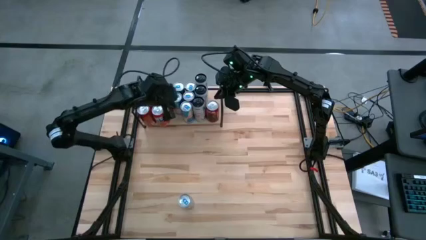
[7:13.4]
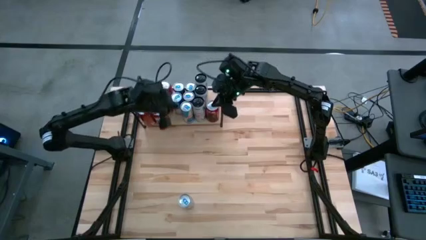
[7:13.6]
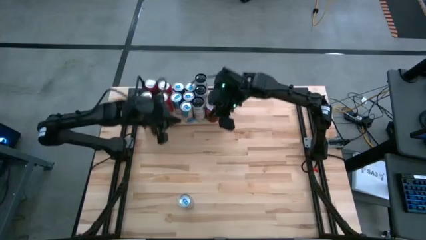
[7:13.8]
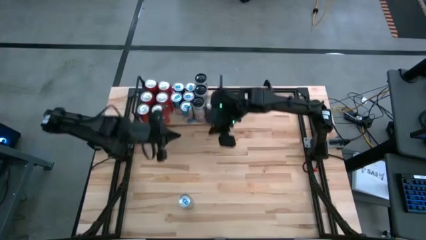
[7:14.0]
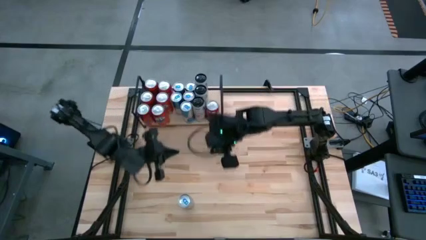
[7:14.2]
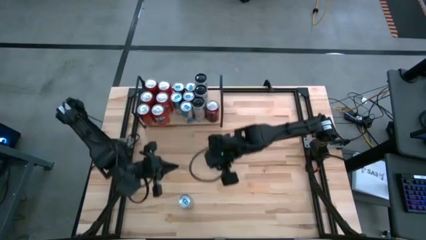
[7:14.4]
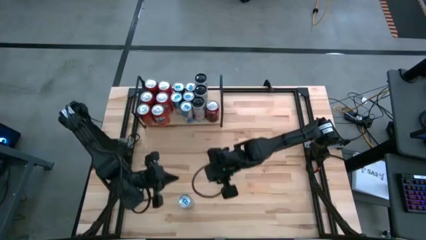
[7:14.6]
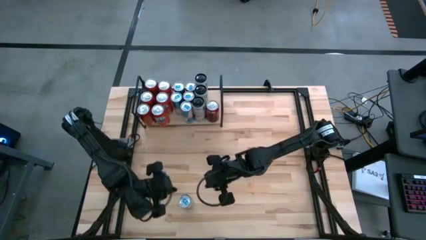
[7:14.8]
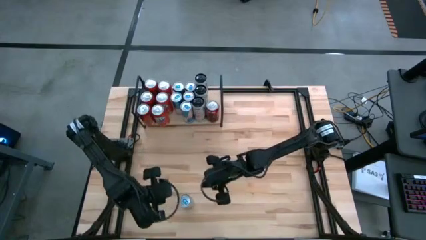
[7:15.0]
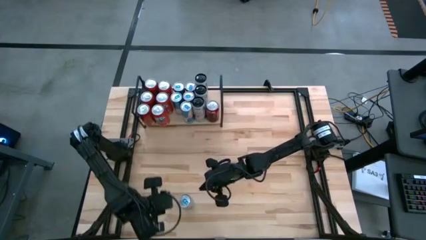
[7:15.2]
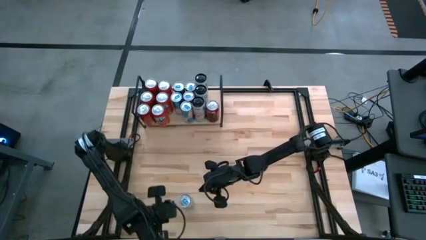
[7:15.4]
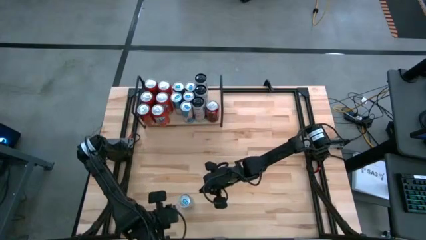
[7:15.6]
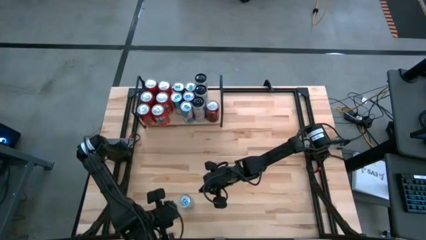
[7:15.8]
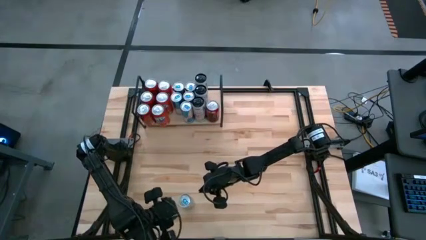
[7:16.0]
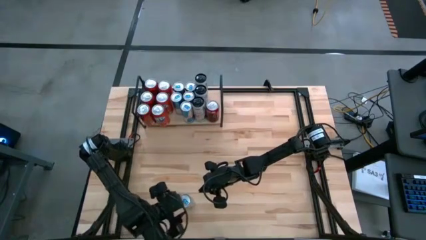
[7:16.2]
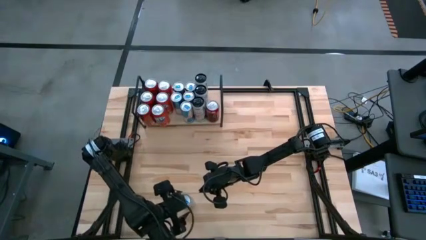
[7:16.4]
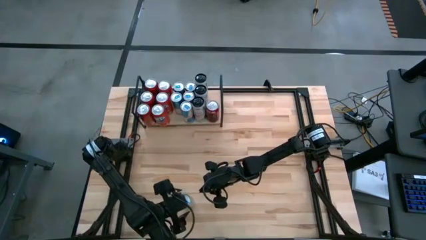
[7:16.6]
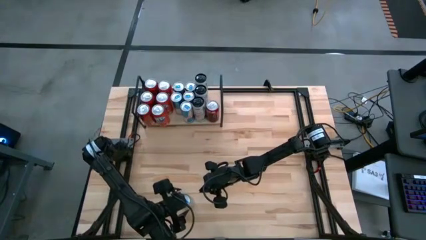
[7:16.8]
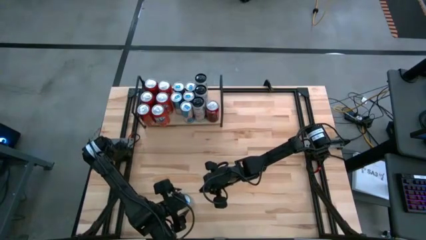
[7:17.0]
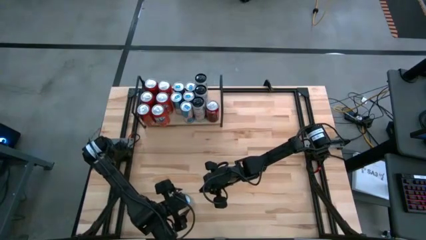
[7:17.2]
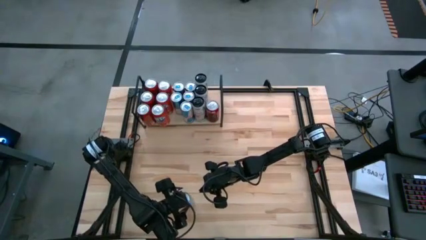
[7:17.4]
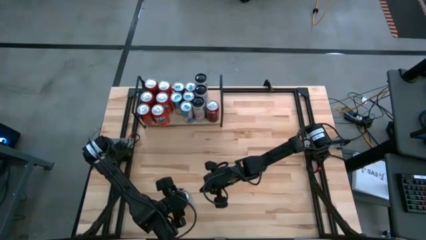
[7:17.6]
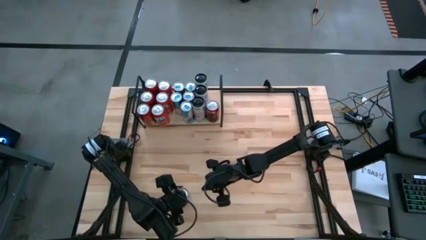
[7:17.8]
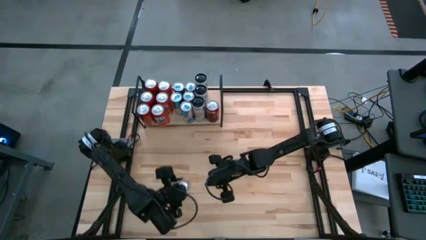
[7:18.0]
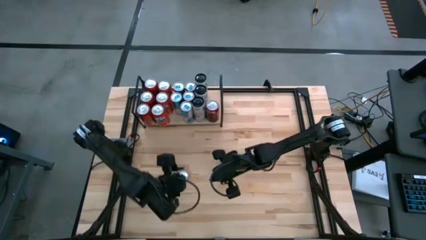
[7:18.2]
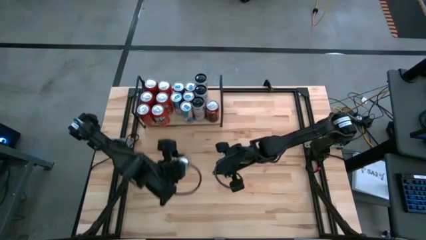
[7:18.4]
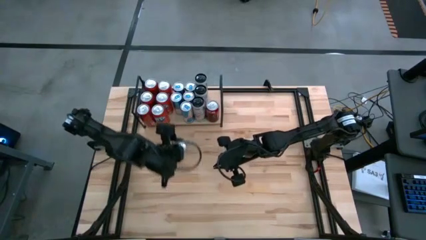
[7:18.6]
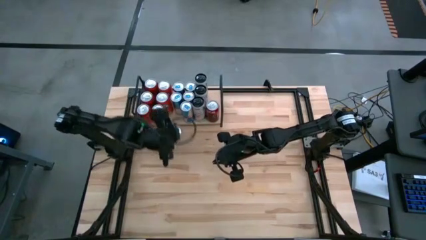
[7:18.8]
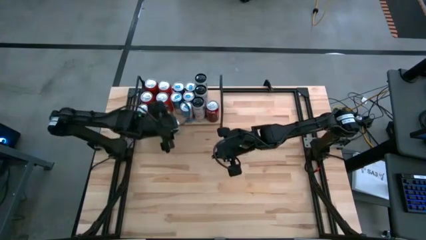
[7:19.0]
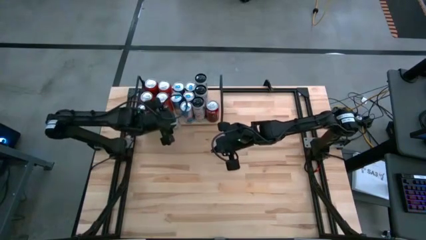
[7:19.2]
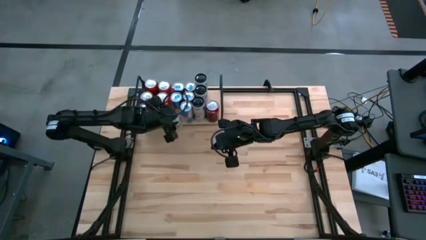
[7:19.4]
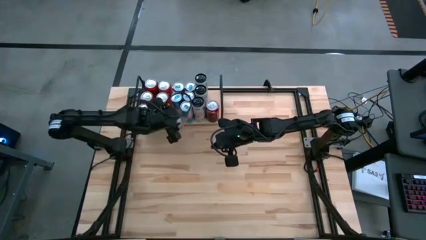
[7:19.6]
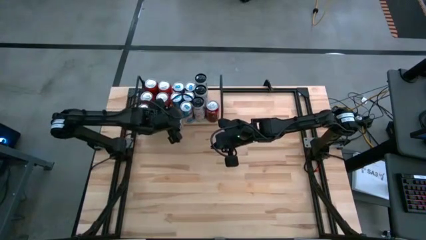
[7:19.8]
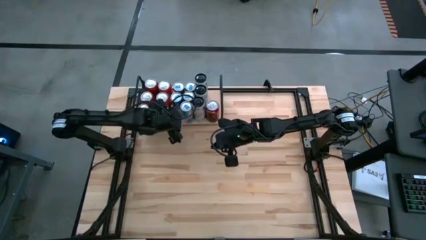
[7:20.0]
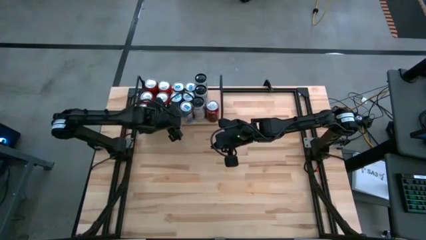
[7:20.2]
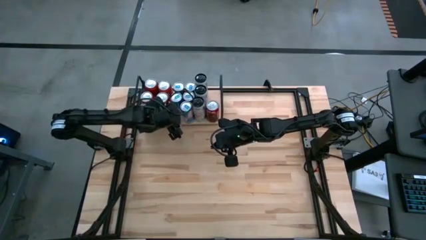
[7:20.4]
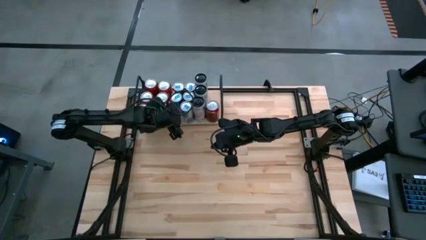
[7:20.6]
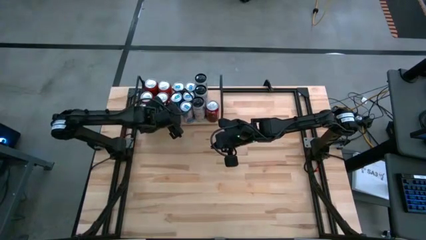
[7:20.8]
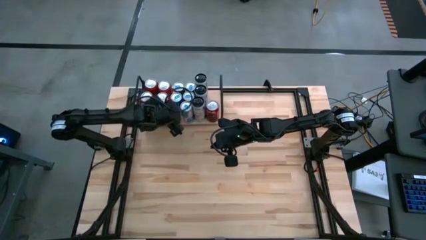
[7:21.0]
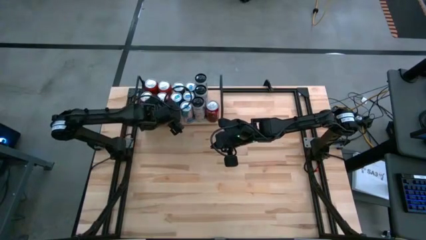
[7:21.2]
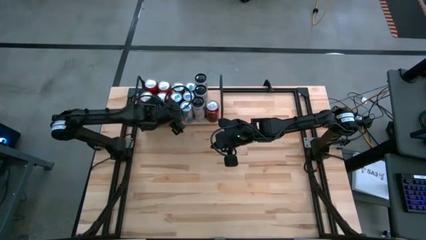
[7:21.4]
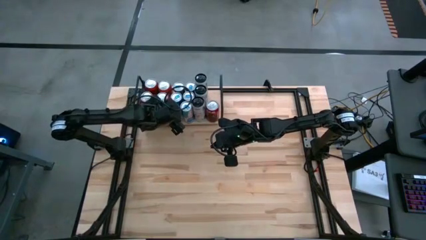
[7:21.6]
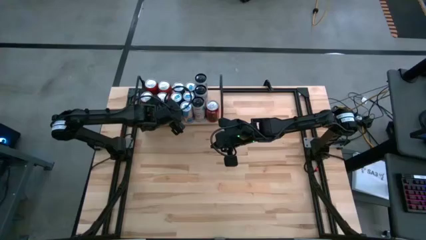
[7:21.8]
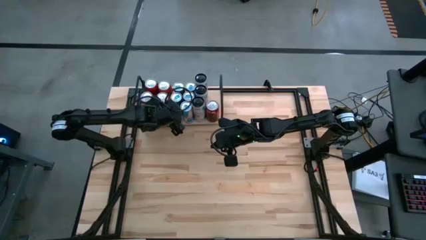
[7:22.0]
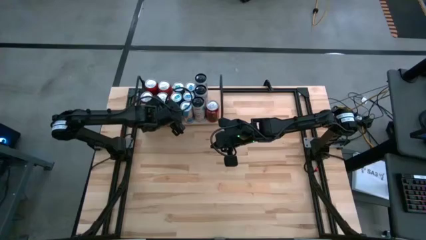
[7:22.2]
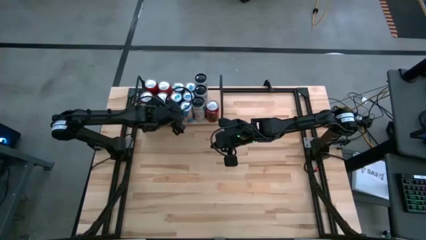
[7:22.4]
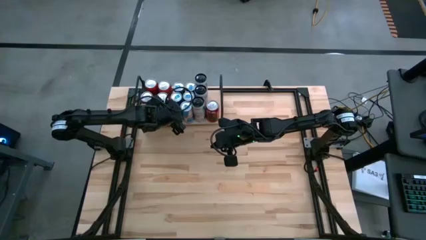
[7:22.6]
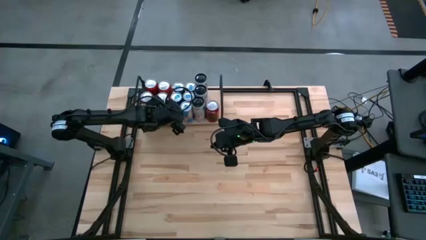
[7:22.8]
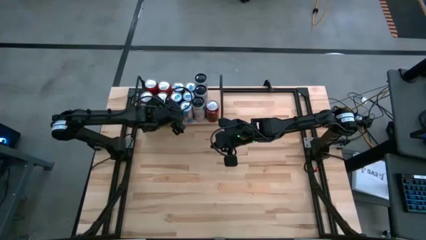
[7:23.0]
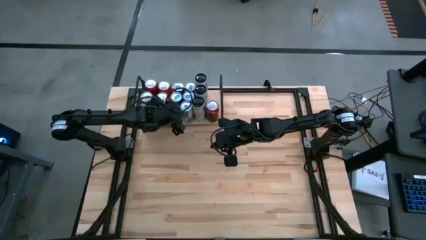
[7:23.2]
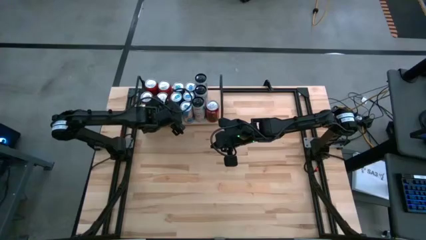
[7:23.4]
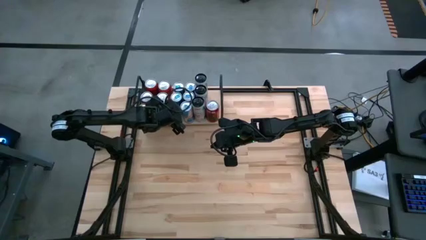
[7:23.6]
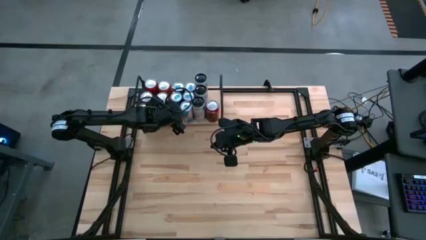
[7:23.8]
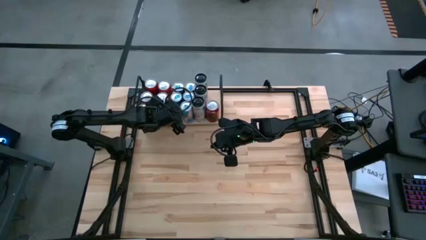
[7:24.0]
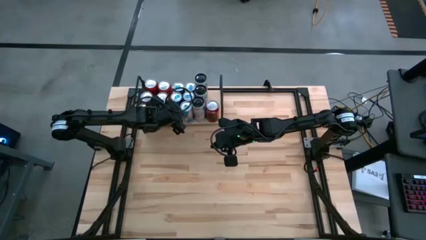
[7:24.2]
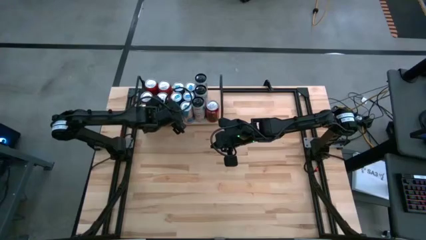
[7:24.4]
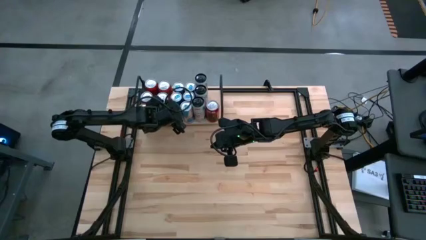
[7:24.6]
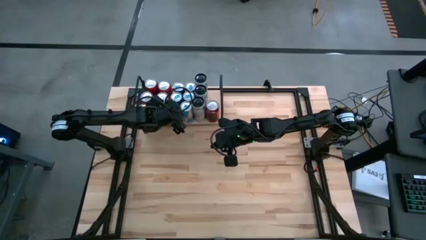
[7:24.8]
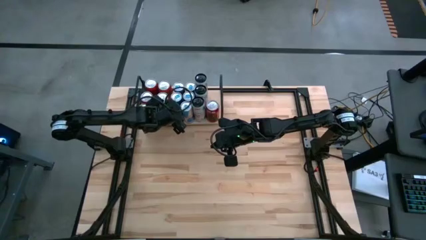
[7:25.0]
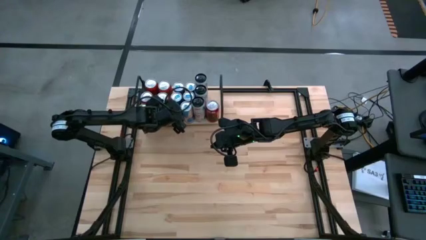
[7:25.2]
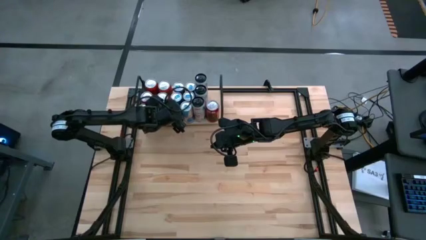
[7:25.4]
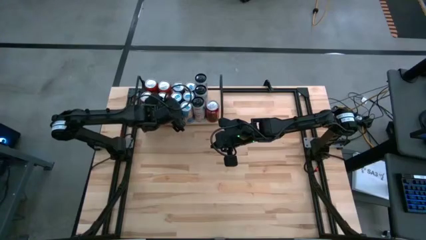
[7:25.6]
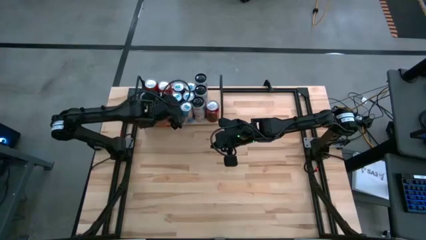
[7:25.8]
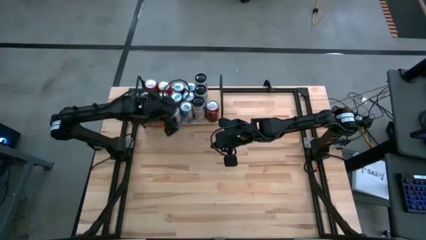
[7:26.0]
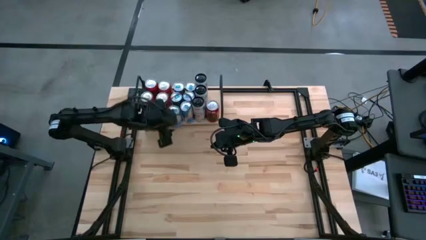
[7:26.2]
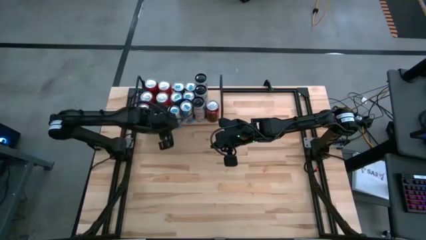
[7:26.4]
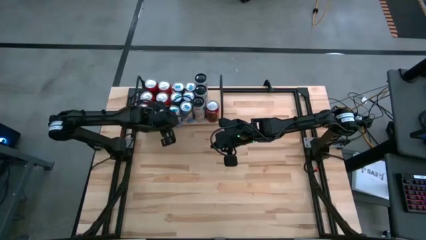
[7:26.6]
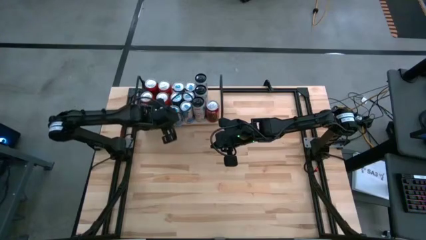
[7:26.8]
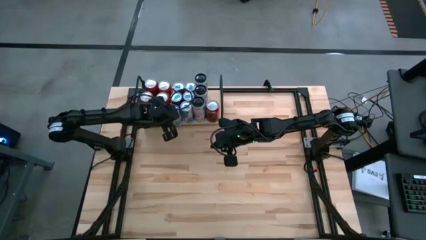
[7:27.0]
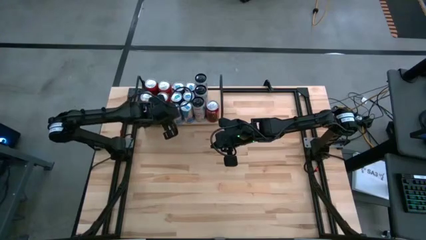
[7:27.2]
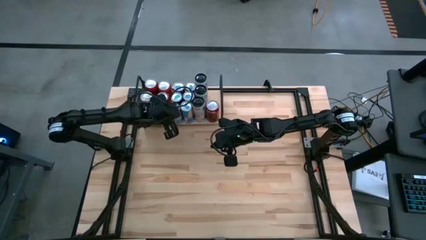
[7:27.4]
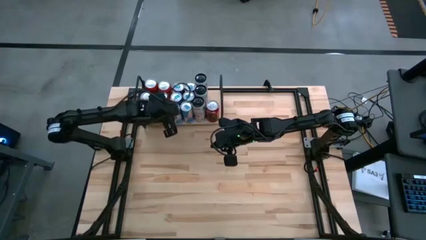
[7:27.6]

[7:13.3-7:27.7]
Task: Place canned beverage on shelf
Put the blue soda can on the shelf aligned with the other blue soda can
